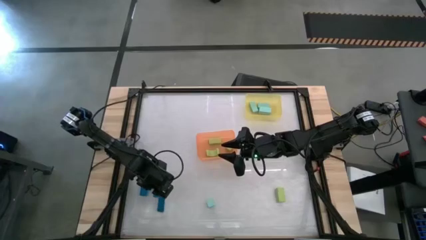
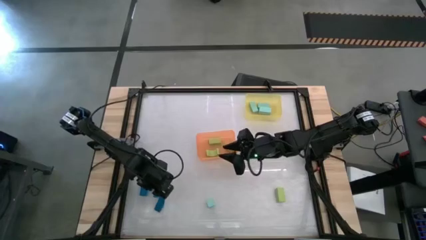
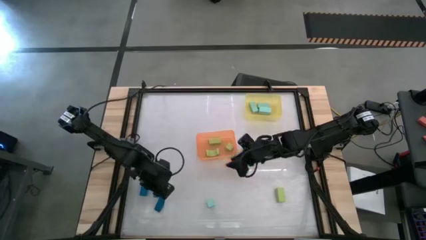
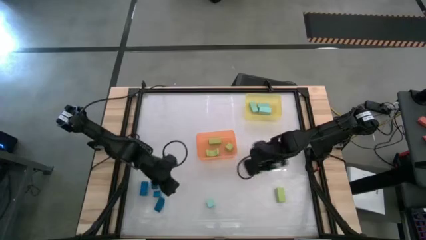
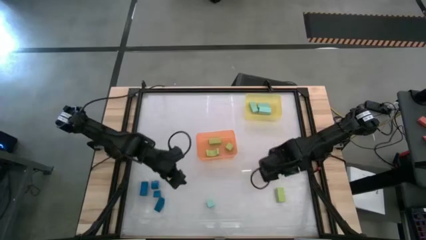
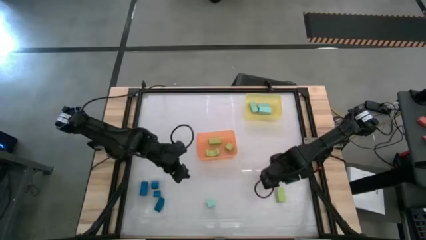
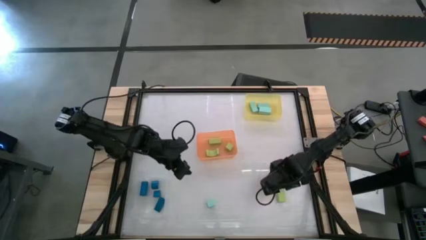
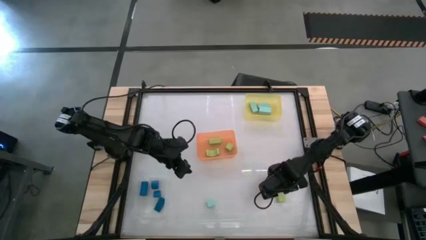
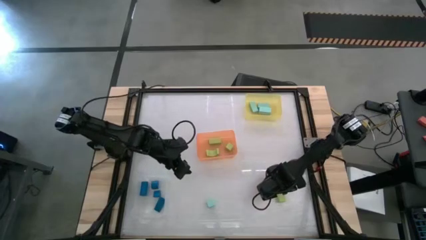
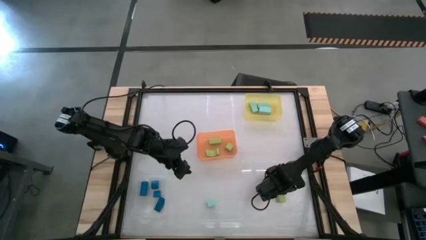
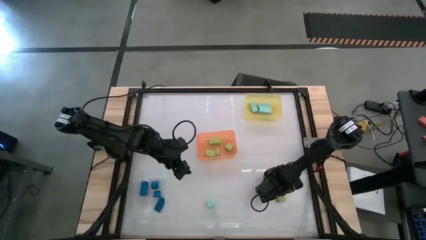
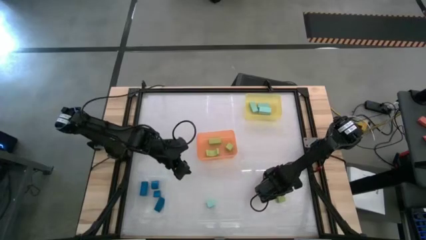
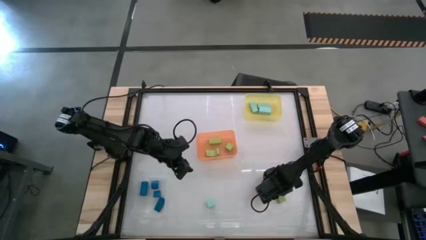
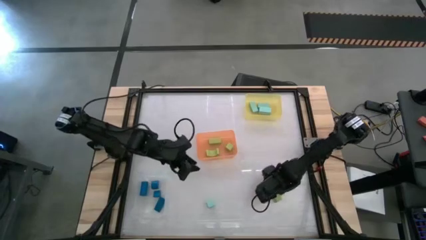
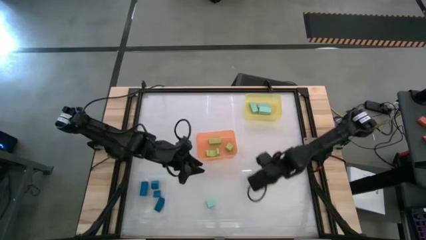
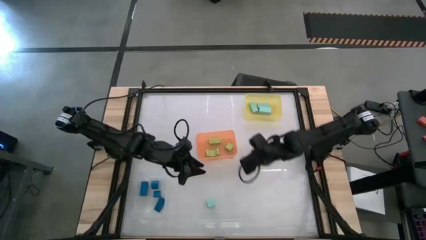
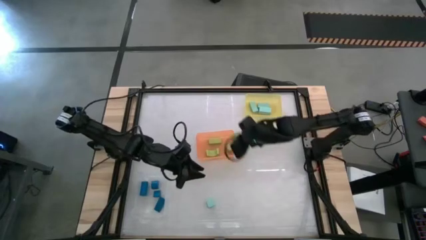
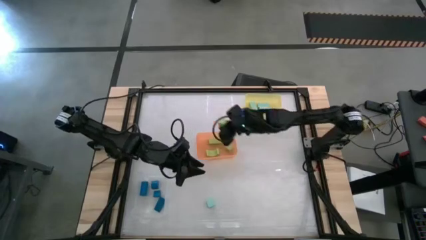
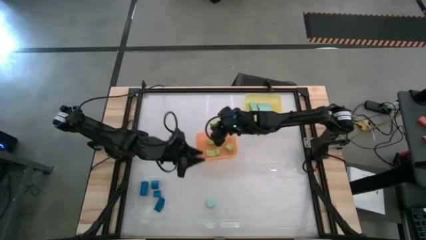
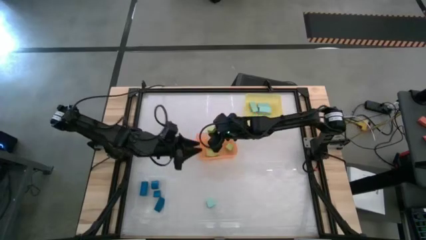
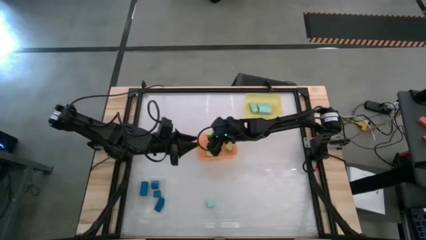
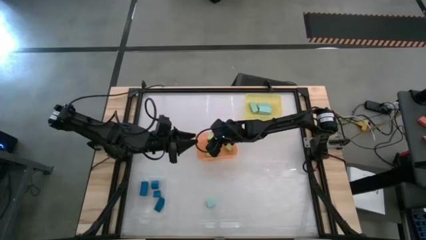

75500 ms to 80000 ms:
Task: Sort & place blocks by color
Put the light green block into the orange bin

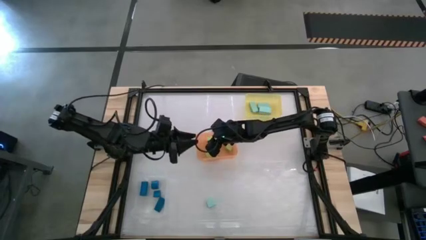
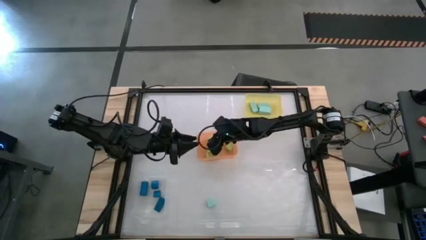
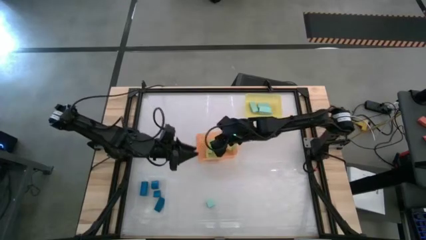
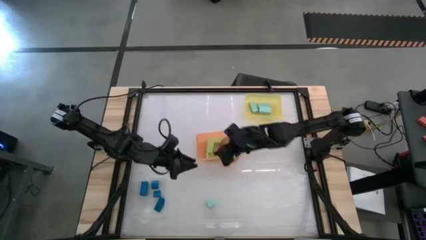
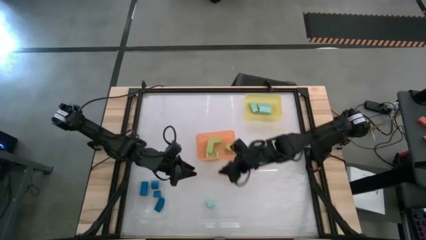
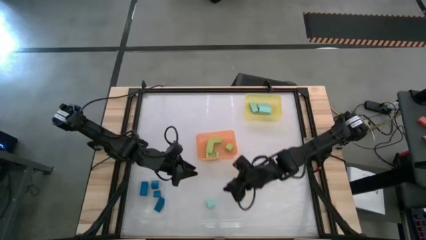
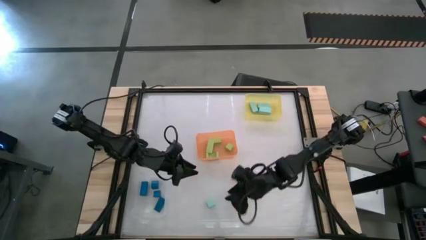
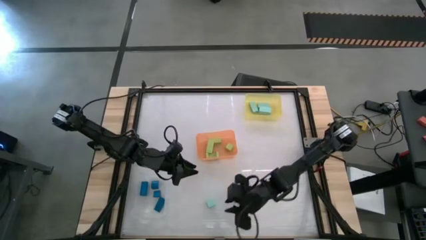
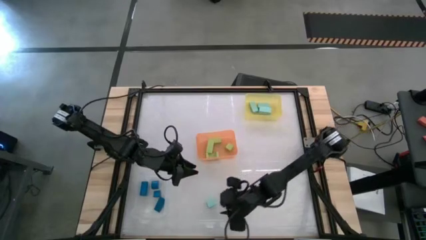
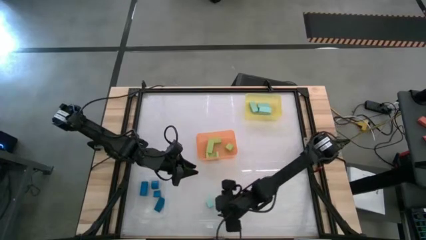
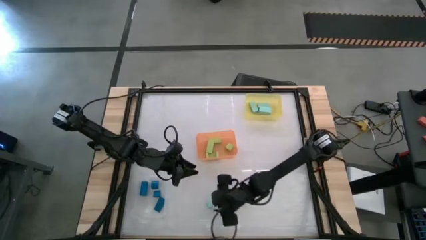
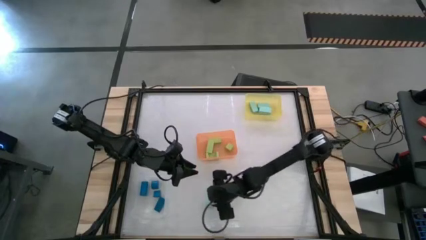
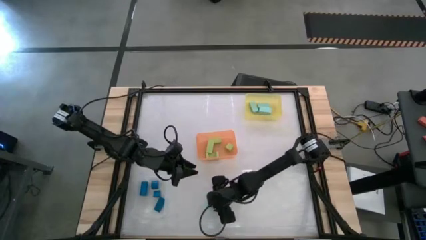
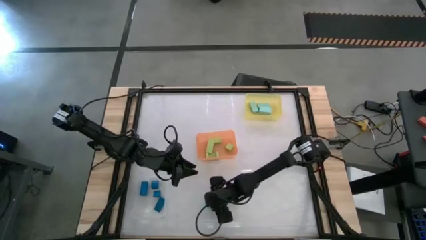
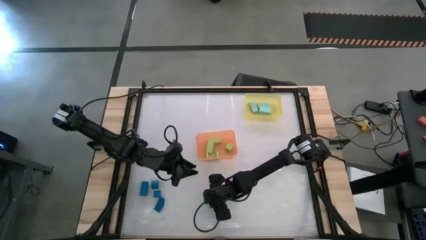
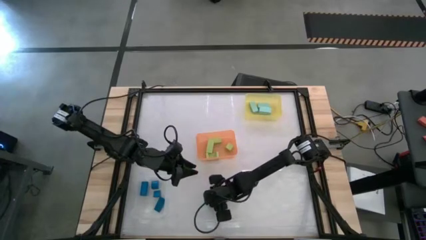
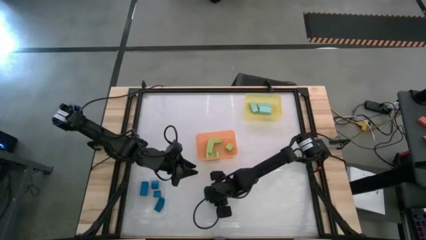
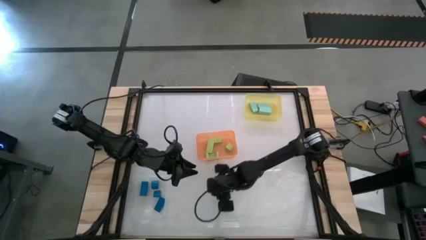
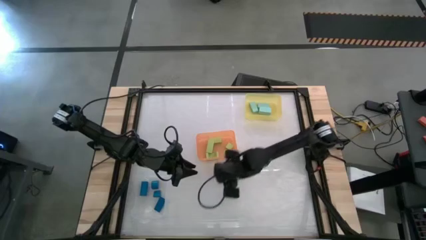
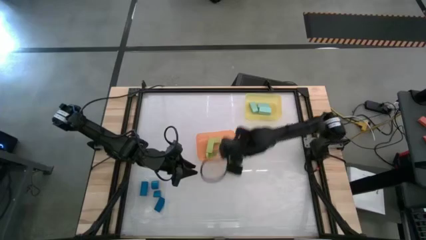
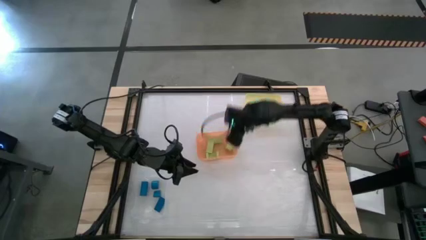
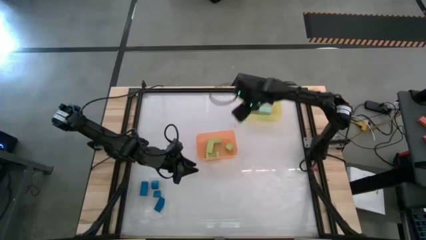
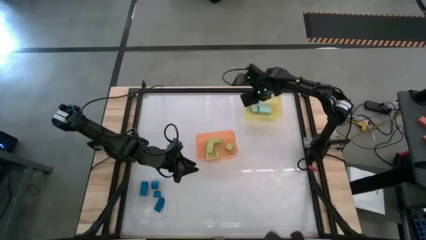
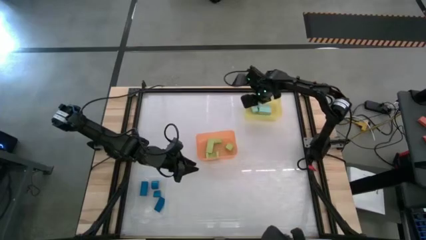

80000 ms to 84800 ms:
Put the light blue block into the yellow bin

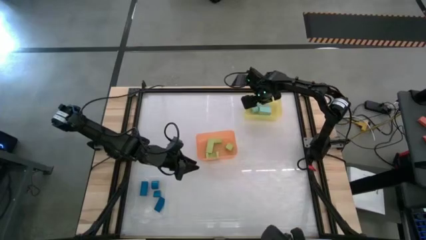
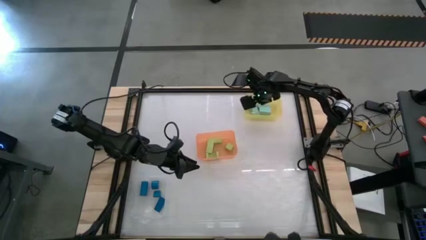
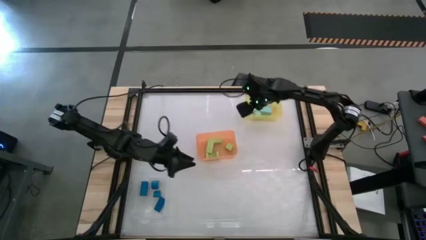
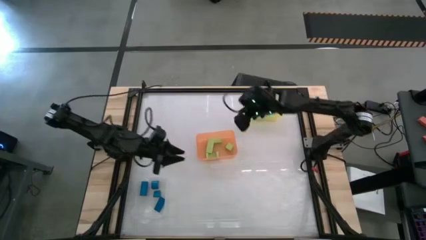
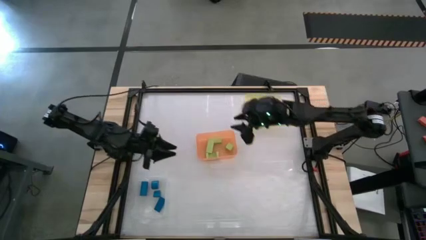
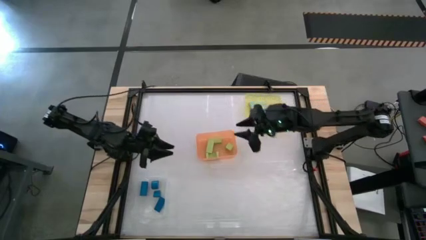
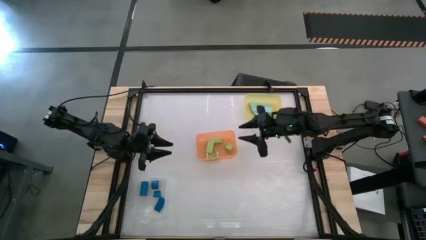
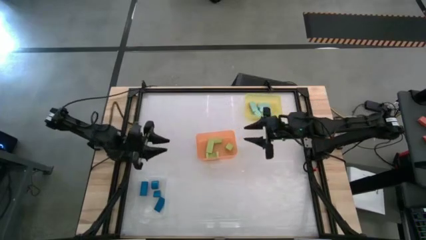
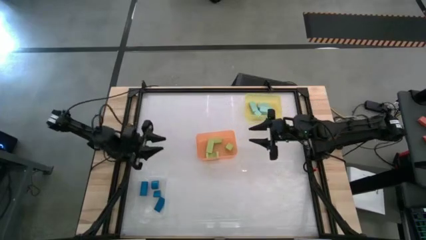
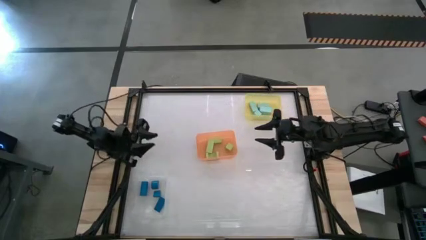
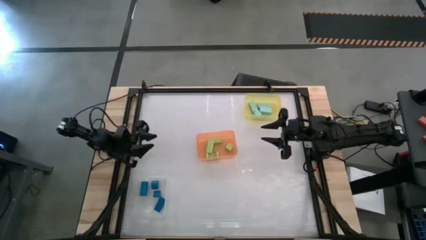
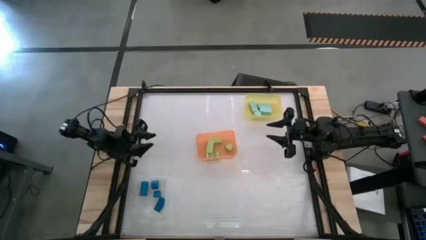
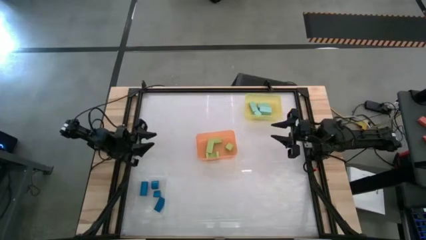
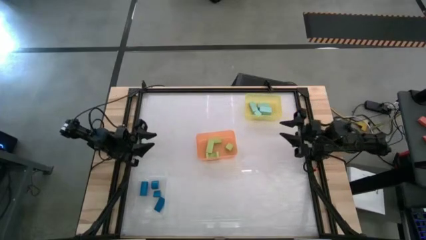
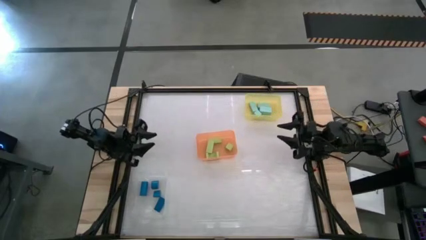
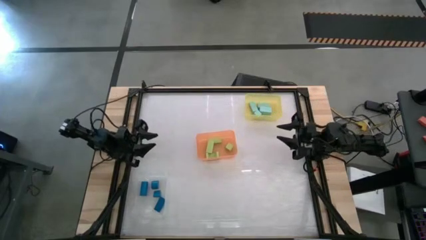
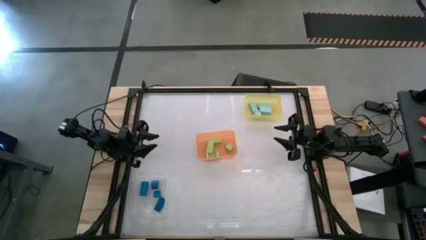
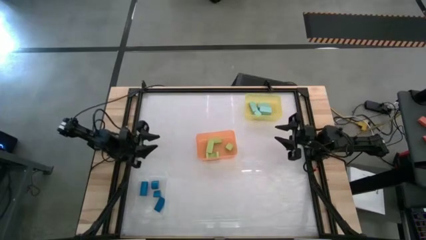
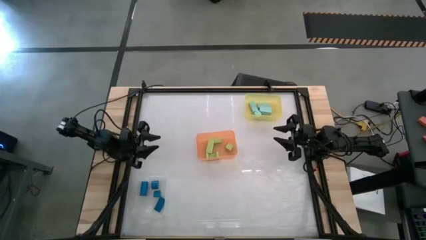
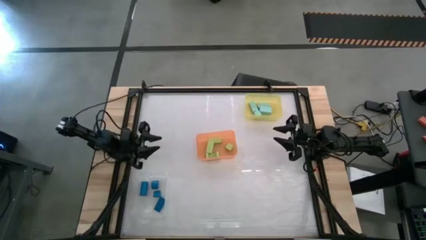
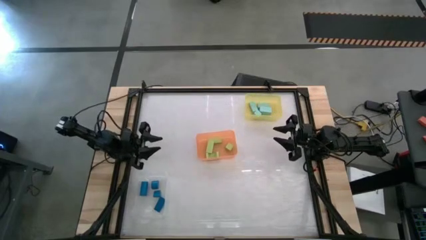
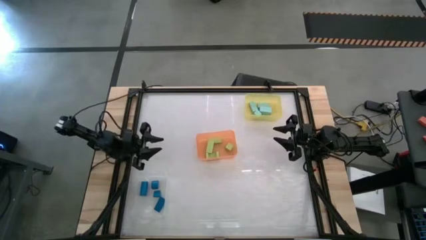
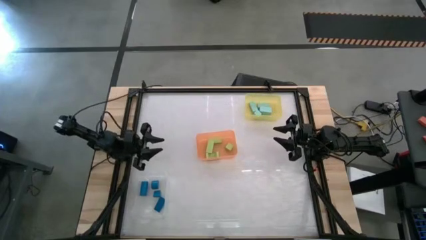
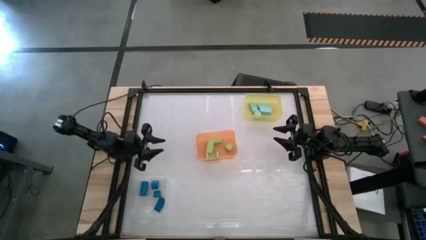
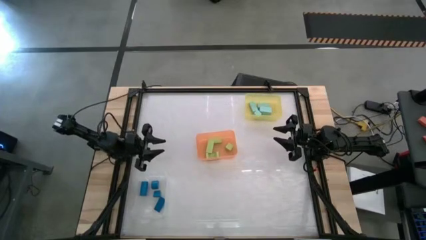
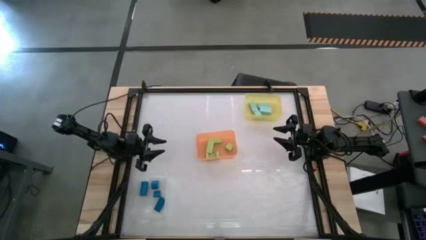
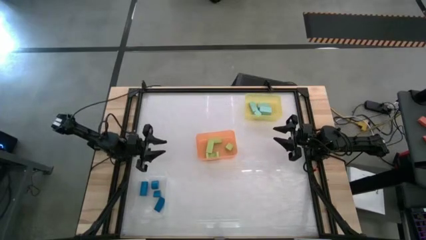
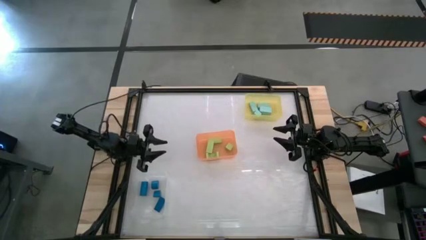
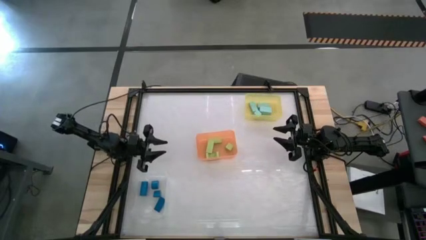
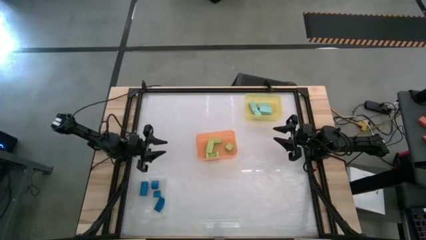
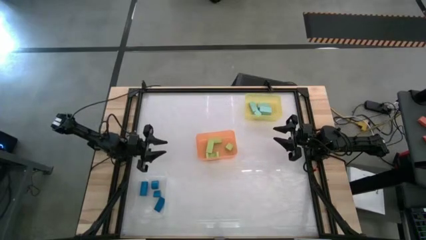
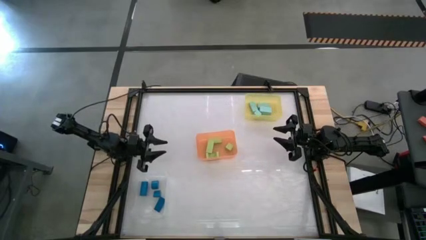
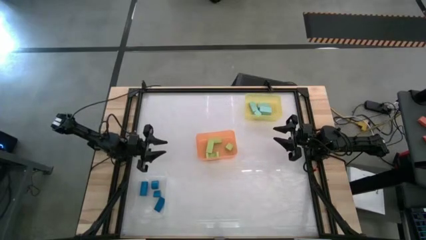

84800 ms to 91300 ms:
Return to Home Position
